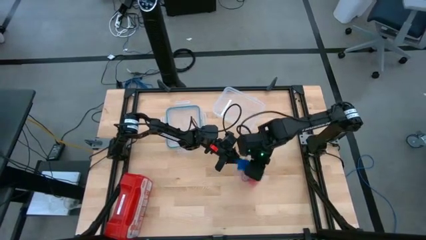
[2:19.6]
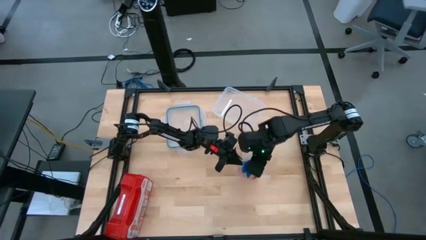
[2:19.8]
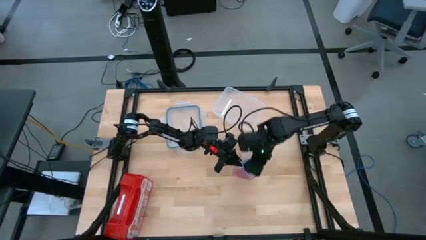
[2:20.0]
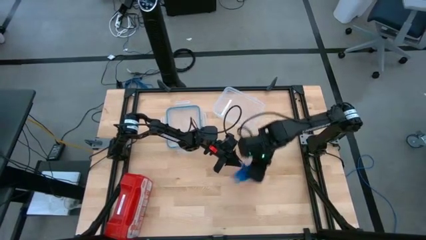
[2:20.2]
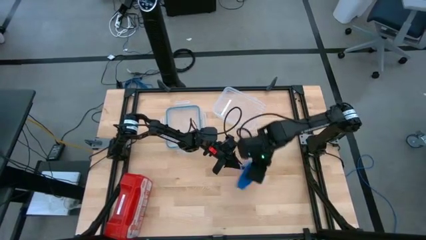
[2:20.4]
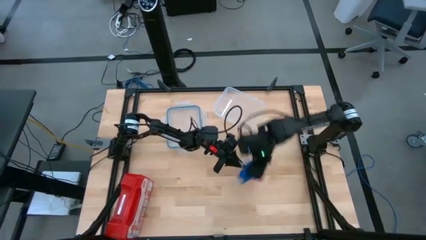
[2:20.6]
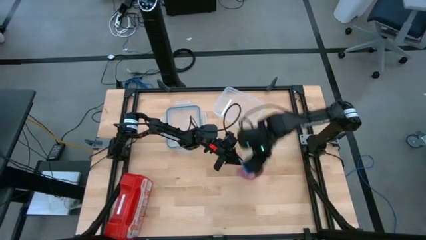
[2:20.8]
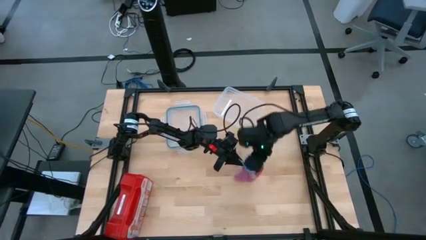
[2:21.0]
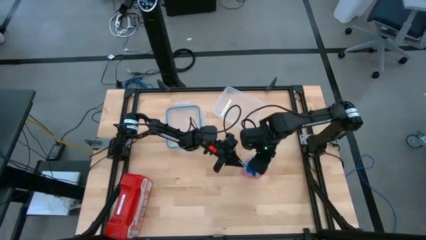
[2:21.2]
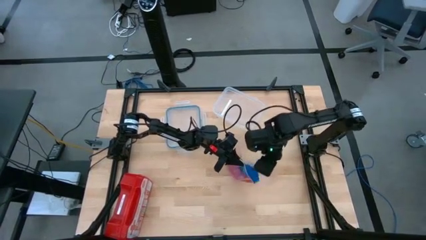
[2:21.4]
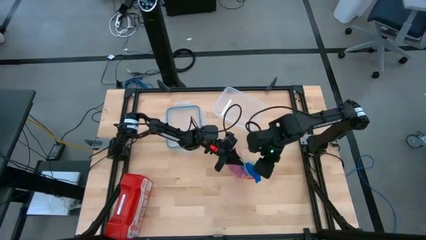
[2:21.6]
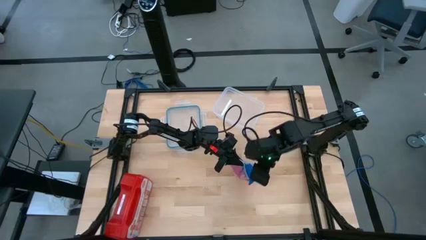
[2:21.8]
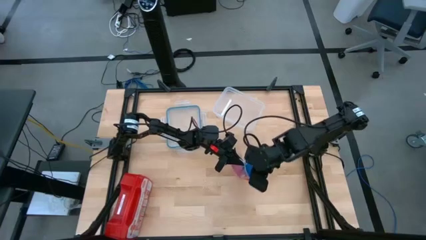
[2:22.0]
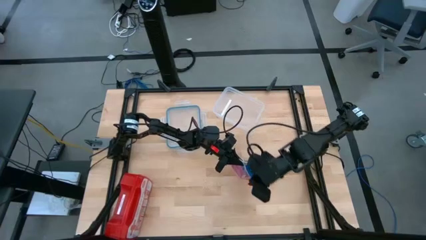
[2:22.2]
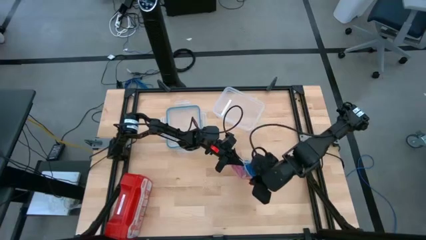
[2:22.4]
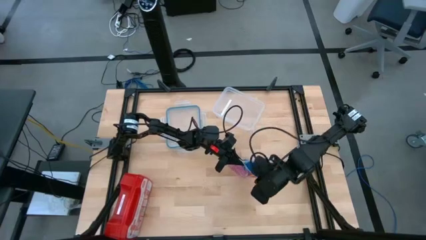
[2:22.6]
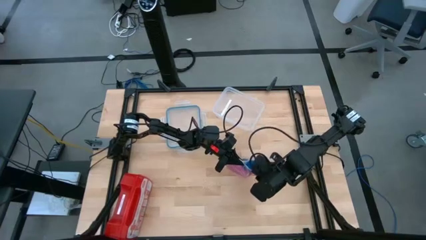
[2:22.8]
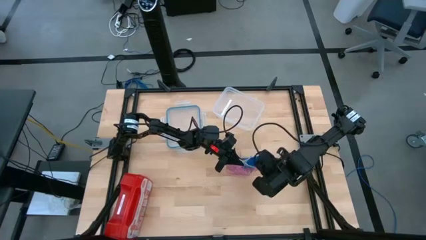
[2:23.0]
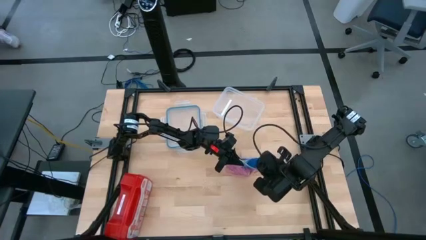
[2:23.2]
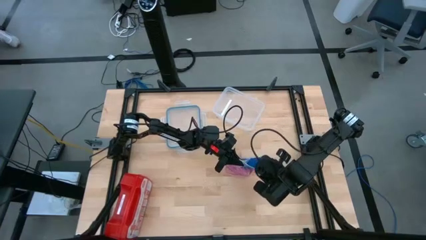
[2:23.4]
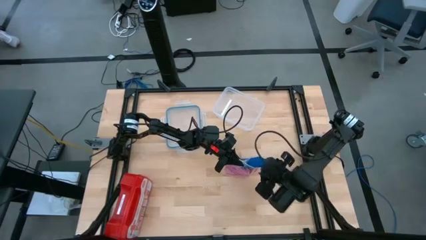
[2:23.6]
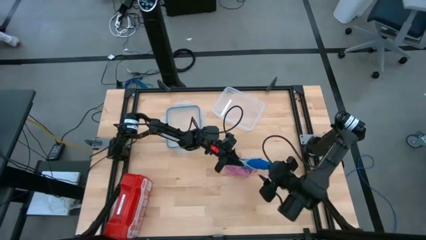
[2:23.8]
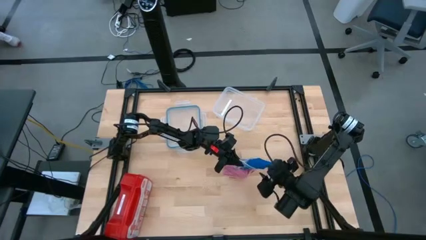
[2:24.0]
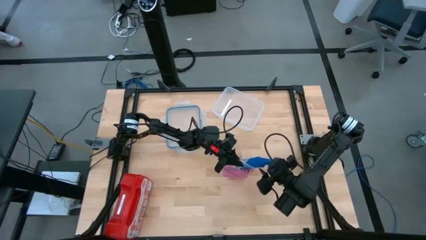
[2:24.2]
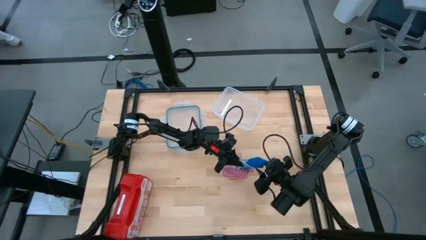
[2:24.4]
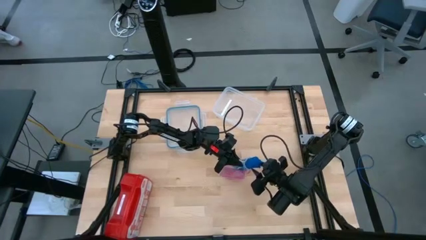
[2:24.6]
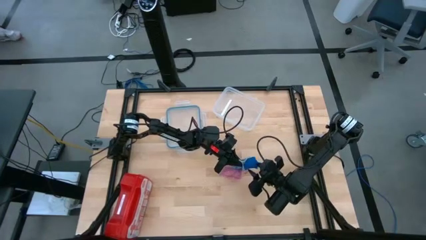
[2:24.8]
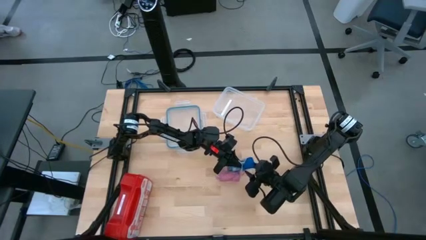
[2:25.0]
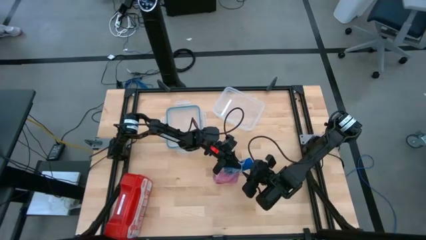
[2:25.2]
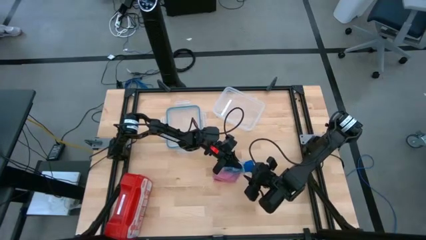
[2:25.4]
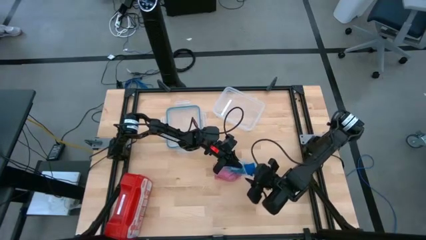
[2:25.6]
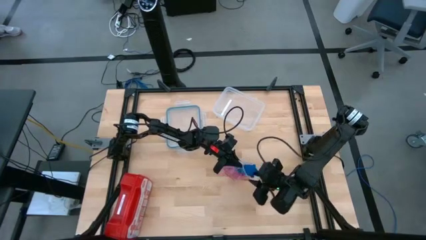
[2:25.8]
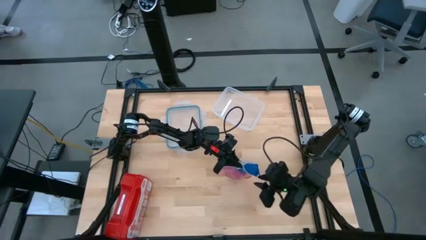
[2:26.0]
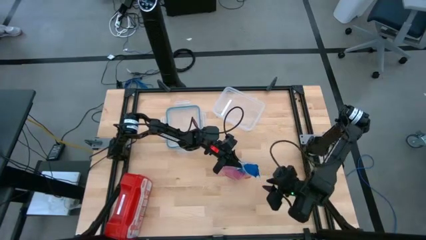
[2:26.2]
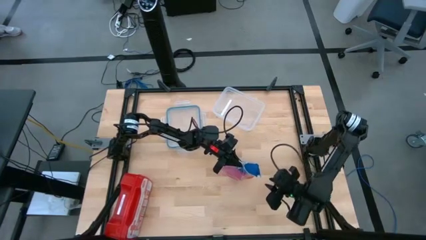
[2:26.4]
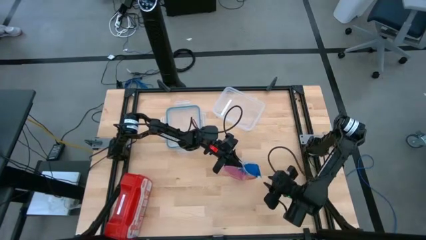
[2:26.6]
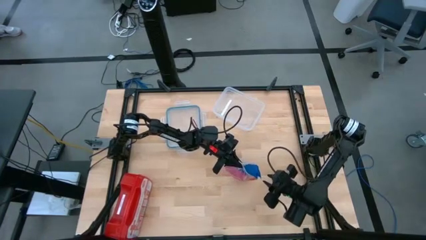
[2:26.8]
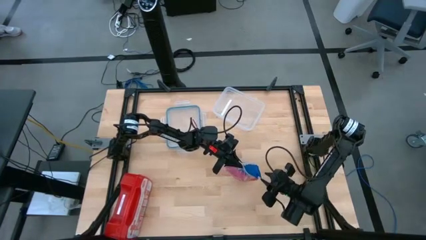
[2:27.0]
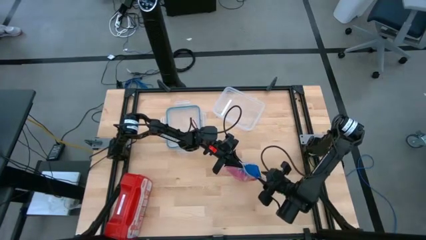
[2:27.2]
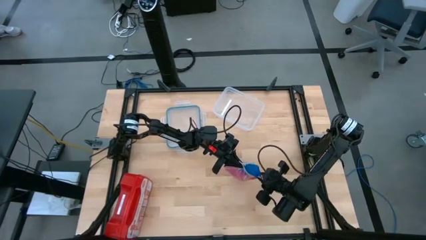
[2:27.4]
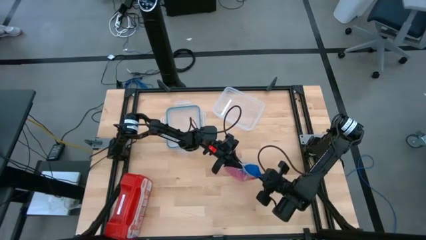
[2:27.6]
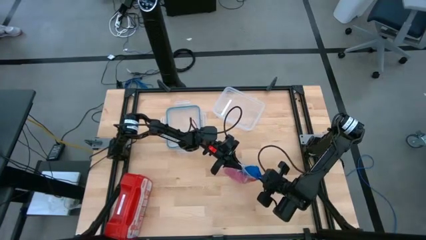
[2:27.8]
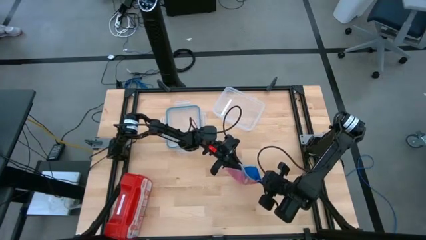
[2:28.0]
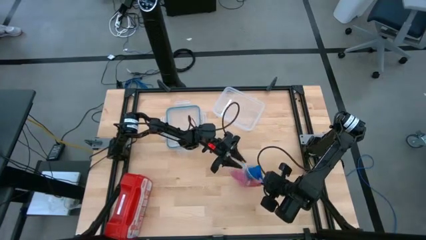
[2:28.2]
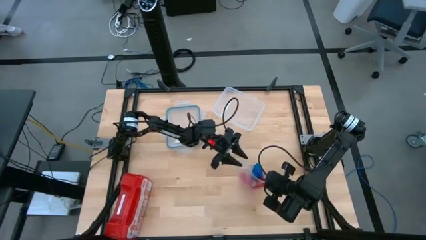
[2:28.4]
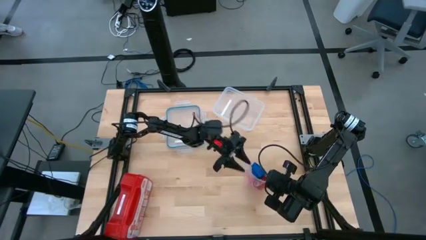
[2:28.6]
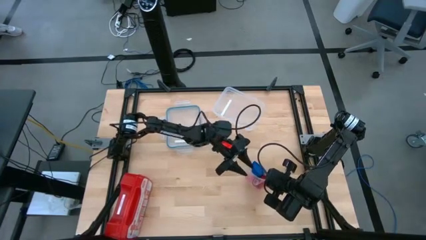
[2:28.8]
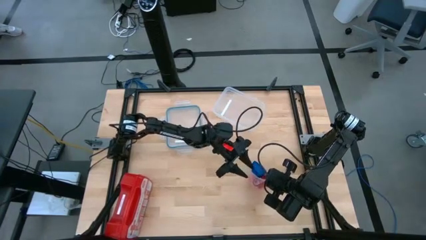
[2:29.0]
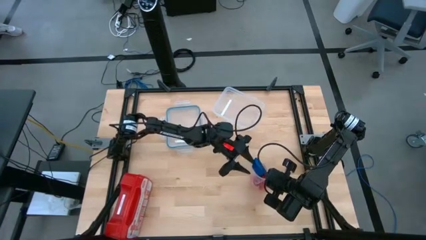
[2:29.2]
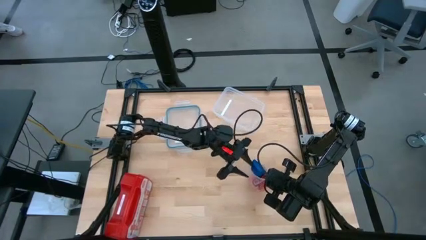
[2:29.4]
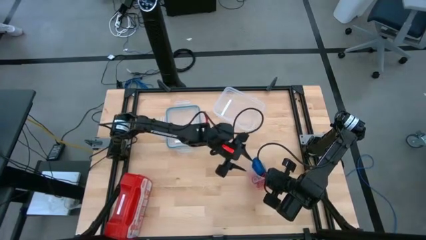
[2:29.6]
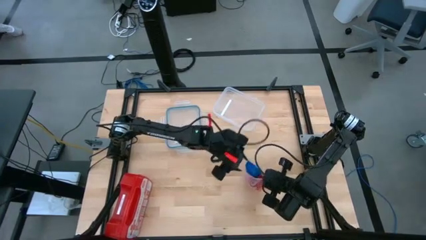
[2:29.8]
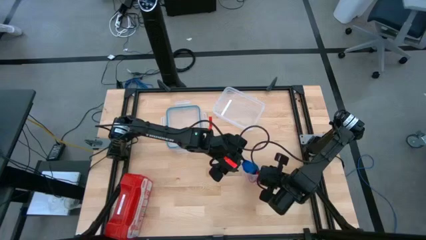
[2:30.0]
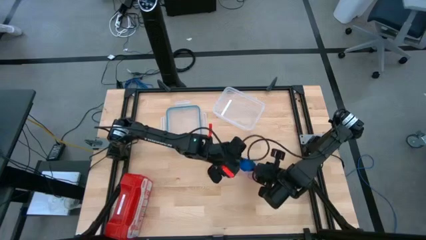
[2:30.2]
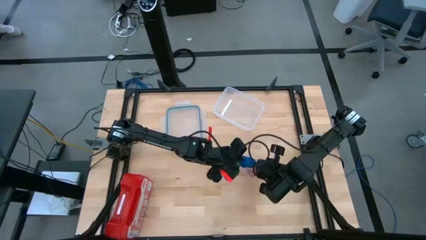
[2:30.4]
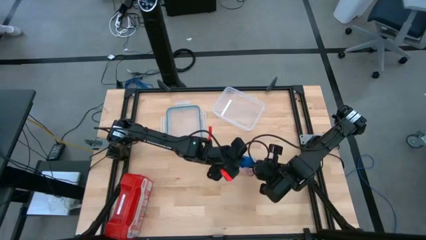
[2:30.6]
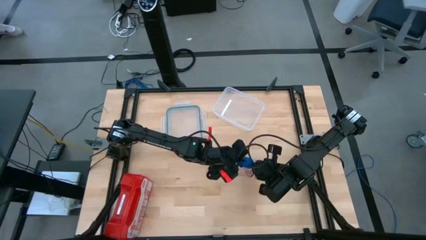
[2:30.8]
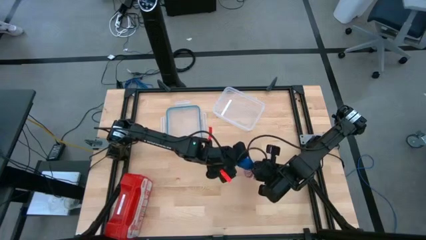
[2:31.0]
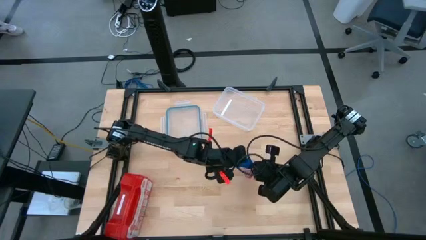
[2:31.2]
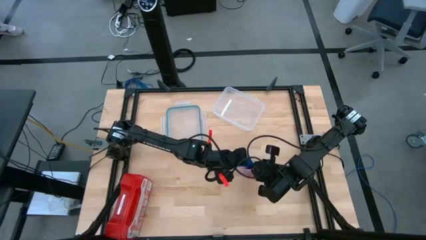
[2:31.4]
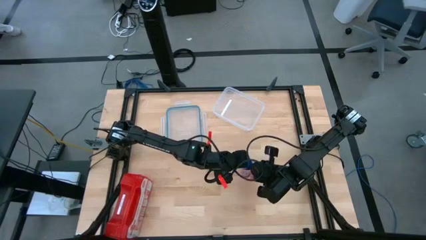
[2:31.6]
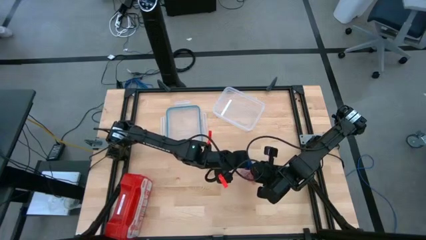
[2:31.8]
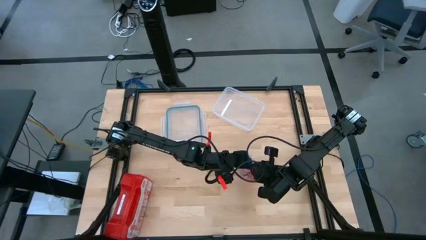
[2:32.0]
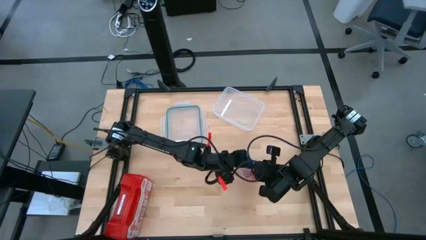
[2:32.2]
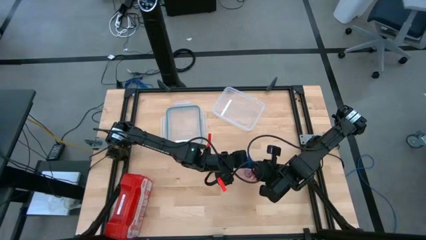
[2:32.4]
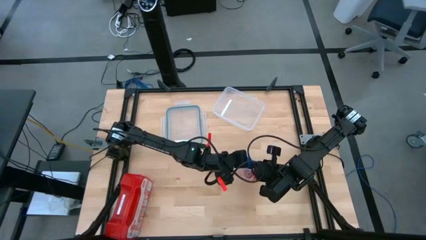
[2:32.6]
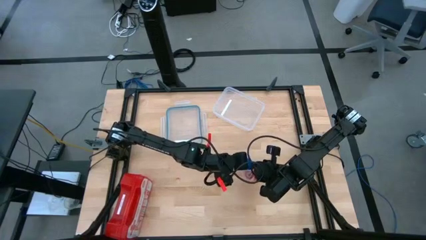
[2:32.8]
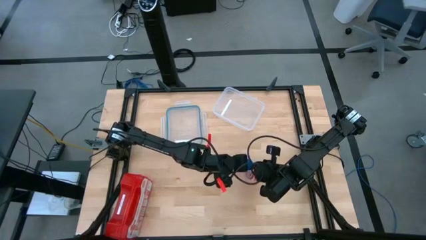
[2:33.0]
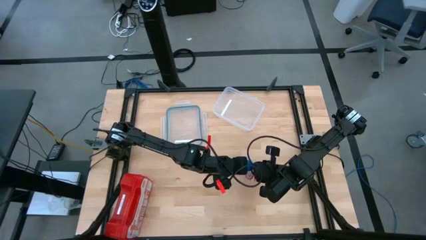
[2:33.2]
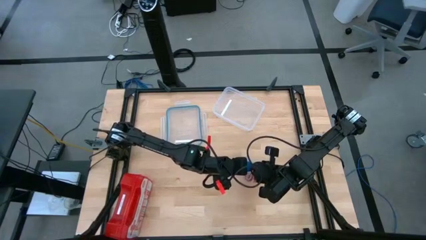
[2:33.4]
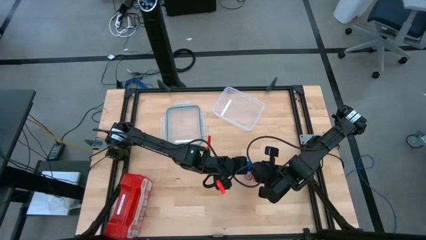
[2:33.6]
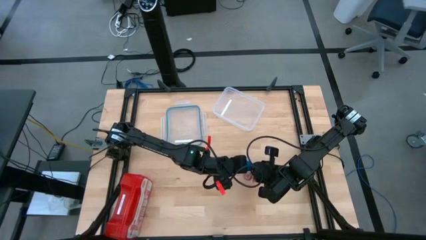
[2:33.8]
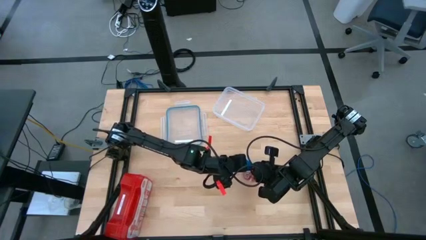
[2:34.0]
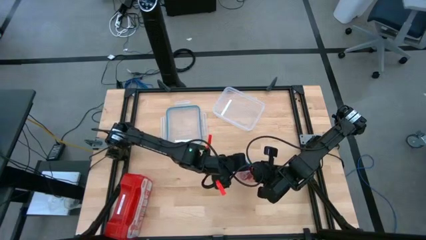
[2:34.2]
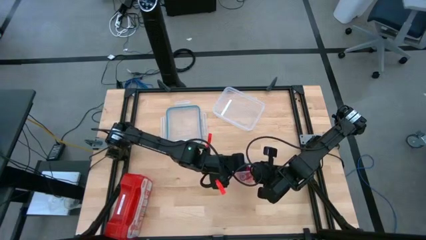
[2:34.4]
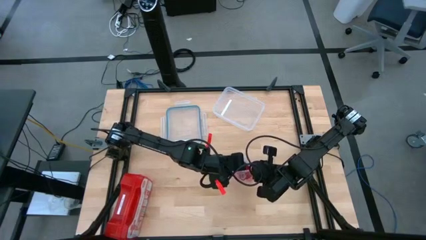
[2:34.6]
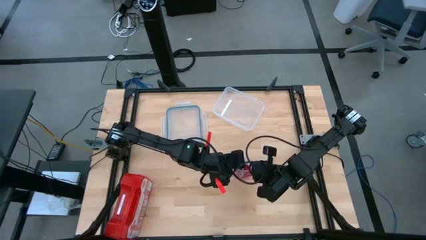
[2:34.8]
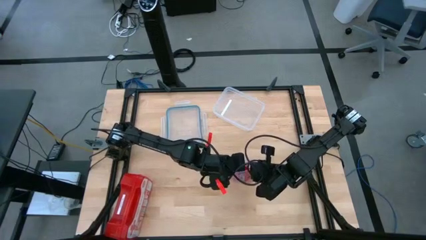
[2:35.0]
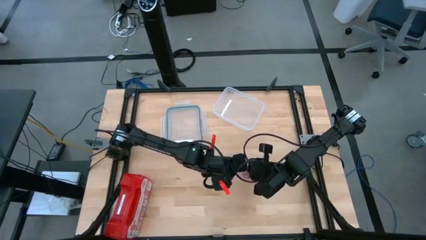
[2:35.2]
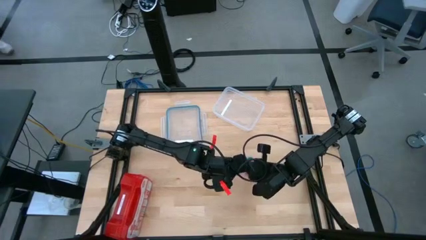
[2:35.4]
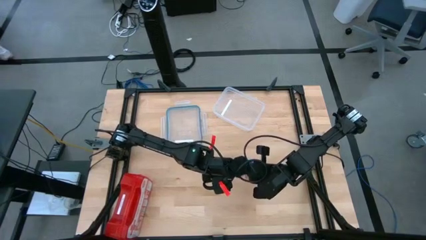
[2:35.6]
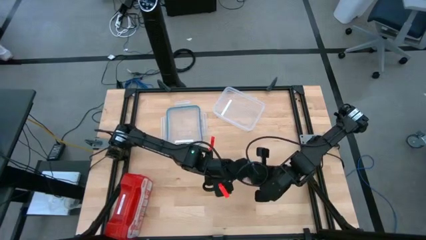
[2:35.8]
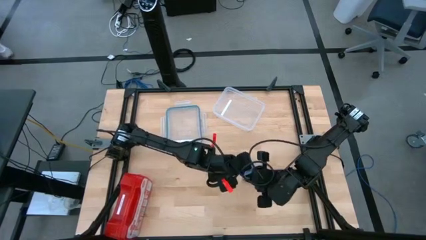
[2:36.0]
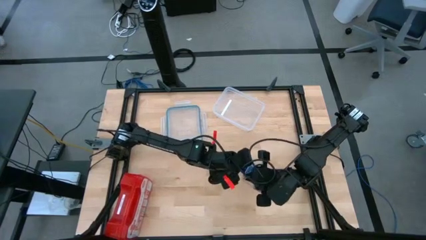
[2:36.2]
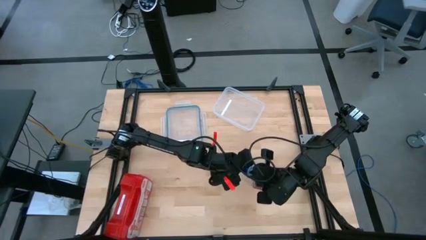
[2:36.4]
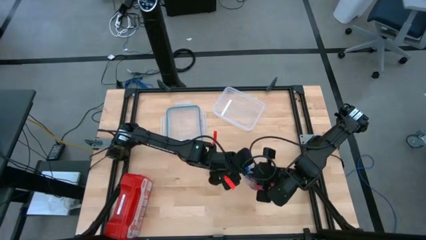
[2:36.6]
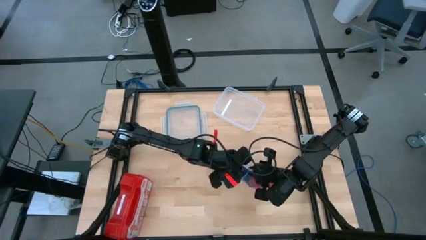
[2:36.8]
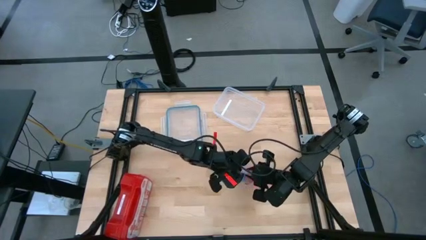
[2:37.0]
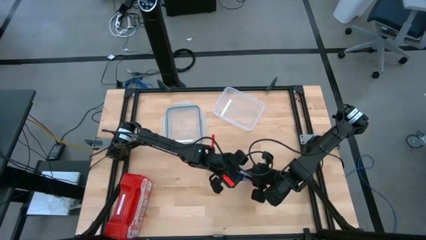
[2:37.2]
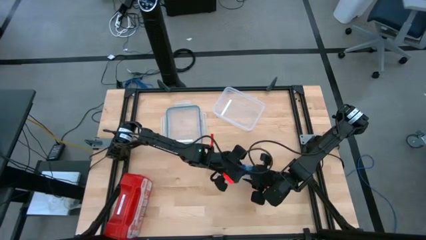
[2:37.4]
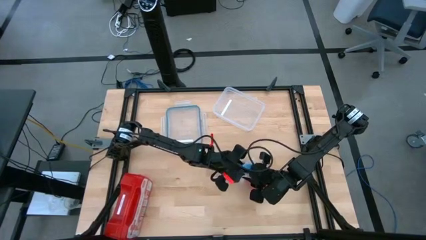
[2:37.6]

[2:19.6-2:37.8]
Task: Roll bandage
Put the blue bandage into the transparent zip bag
